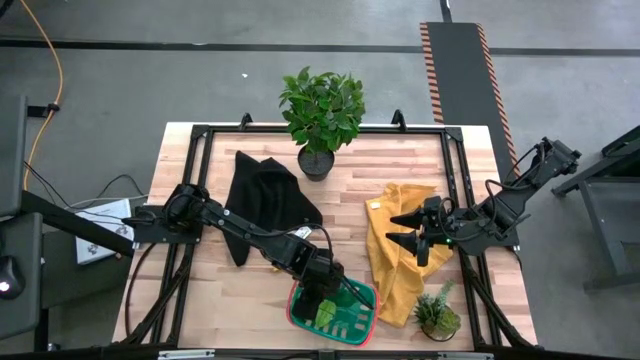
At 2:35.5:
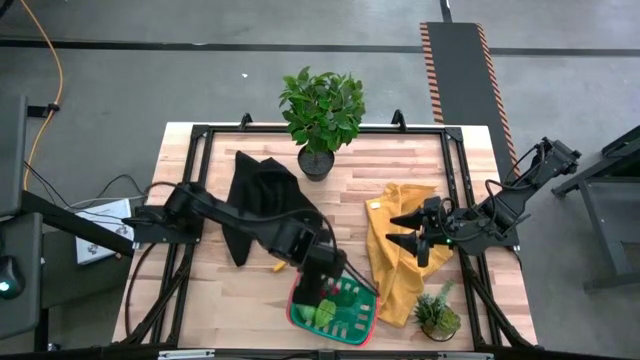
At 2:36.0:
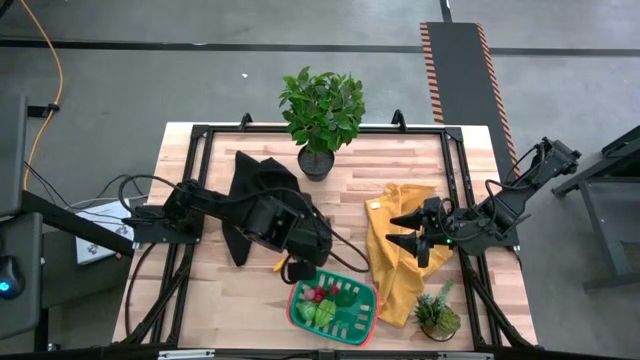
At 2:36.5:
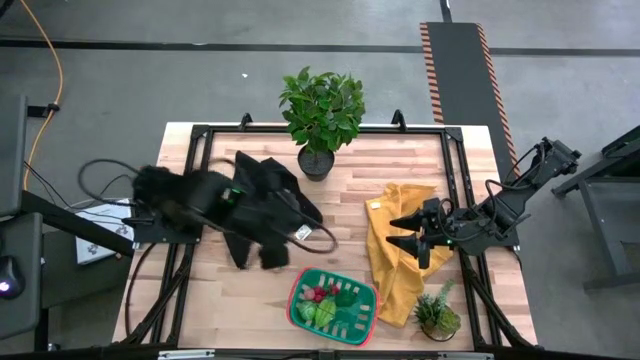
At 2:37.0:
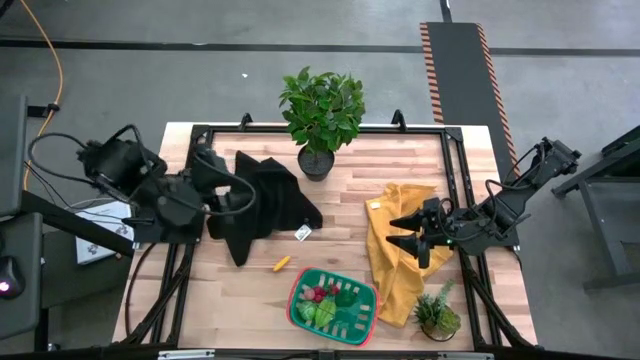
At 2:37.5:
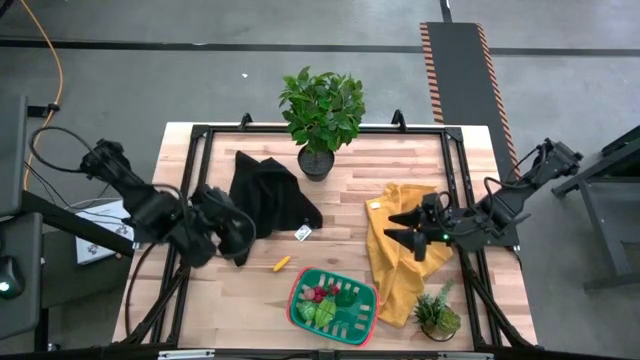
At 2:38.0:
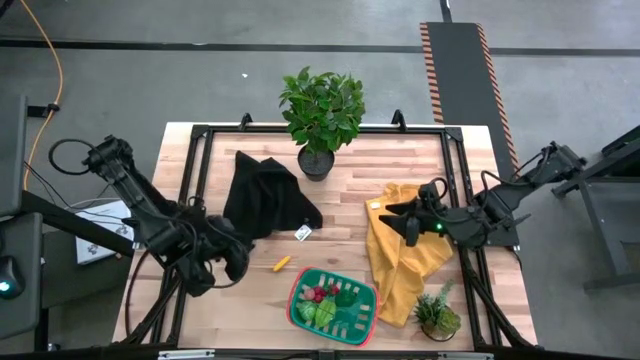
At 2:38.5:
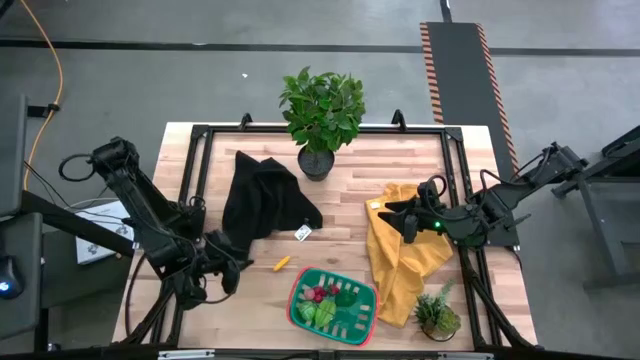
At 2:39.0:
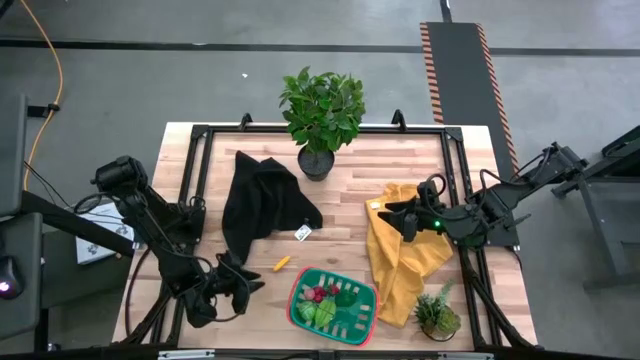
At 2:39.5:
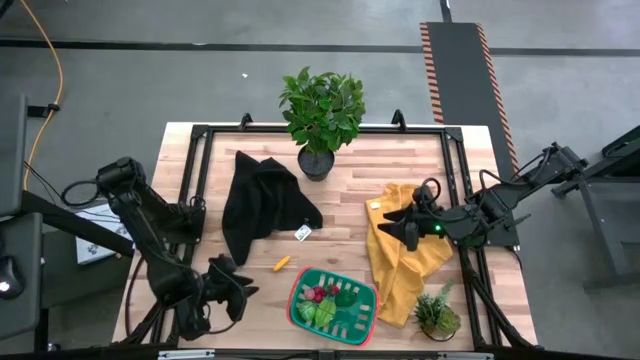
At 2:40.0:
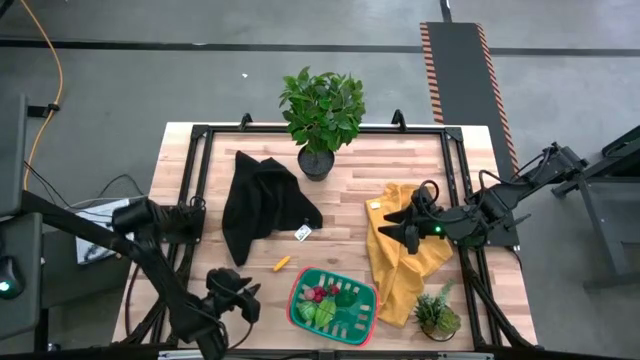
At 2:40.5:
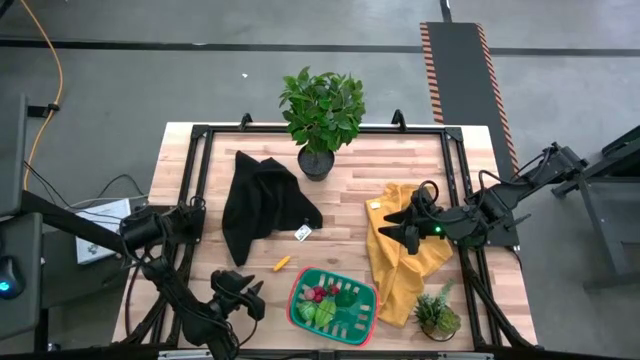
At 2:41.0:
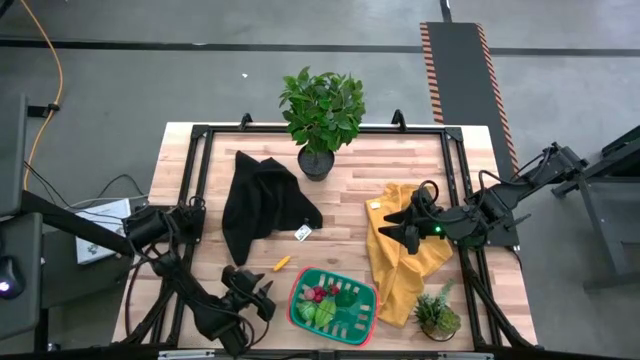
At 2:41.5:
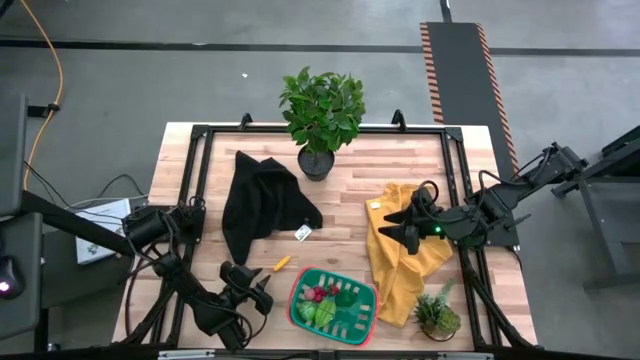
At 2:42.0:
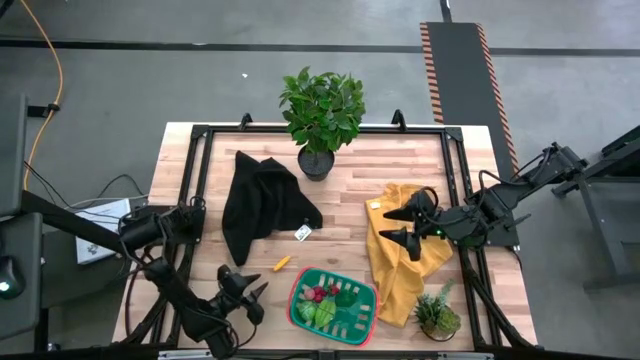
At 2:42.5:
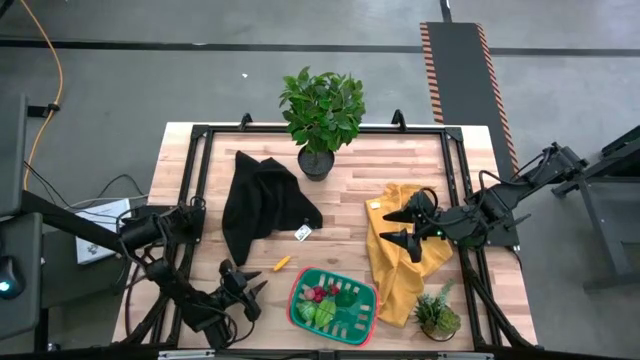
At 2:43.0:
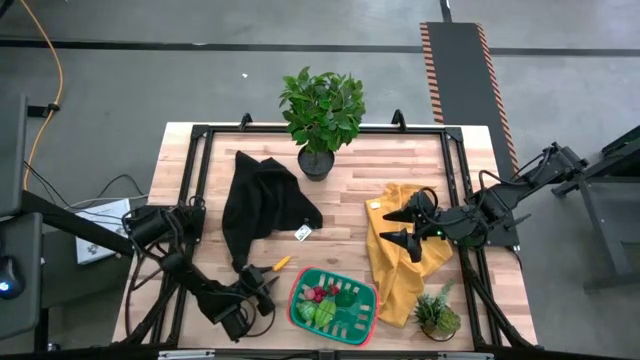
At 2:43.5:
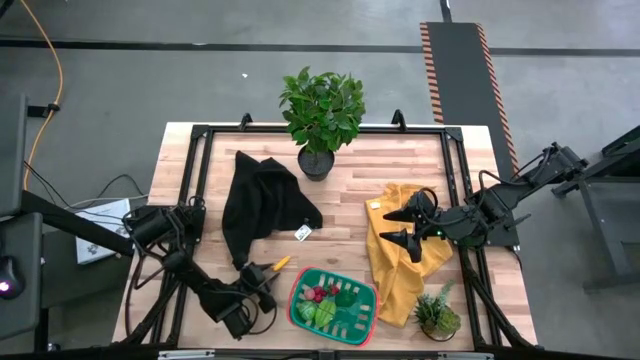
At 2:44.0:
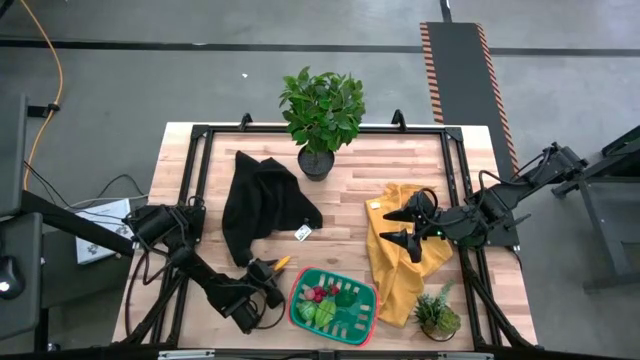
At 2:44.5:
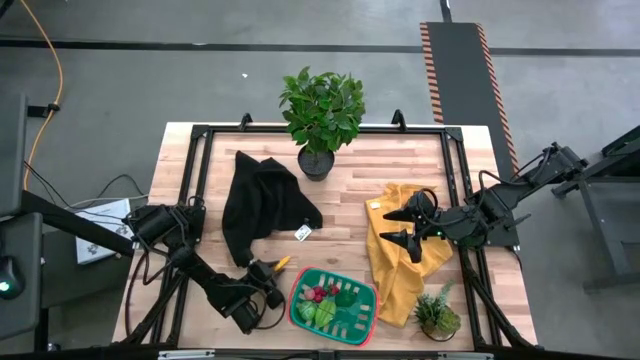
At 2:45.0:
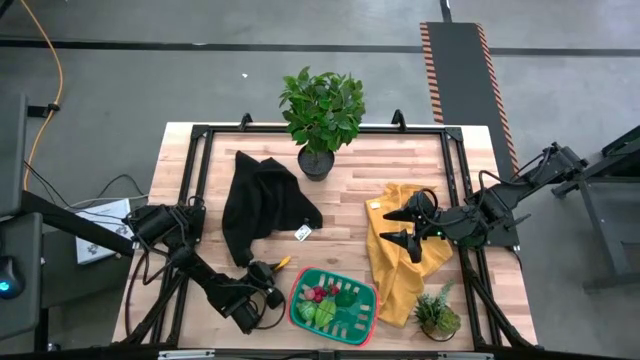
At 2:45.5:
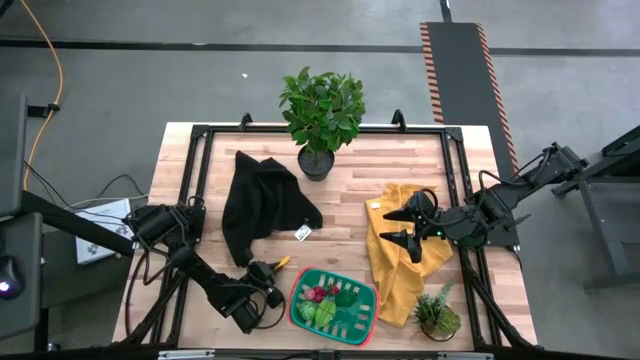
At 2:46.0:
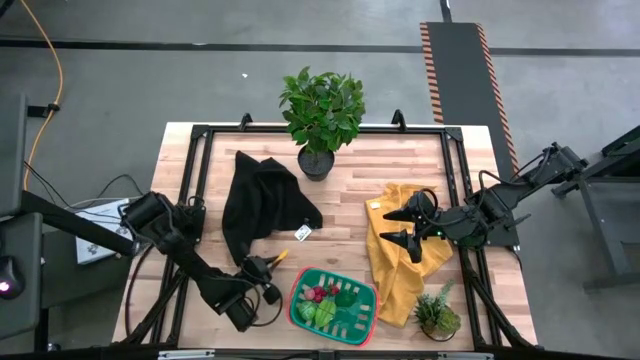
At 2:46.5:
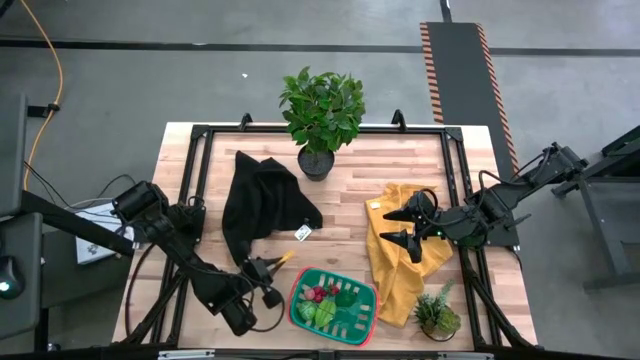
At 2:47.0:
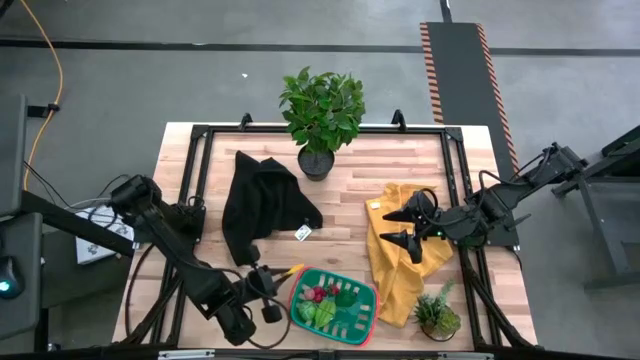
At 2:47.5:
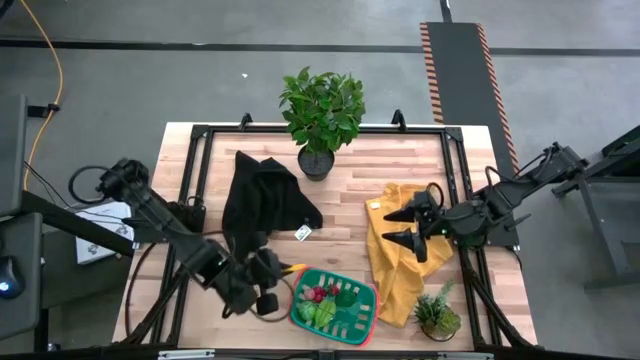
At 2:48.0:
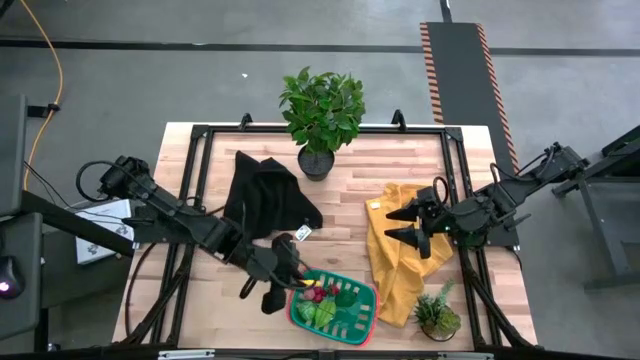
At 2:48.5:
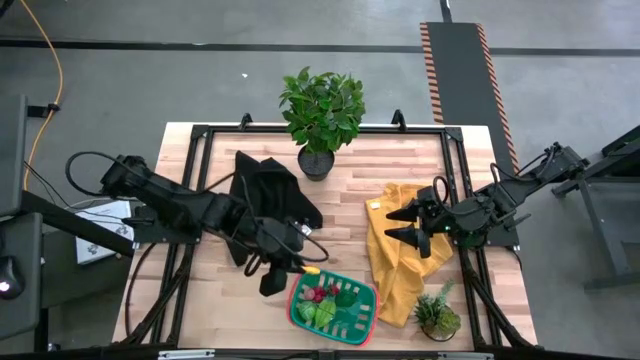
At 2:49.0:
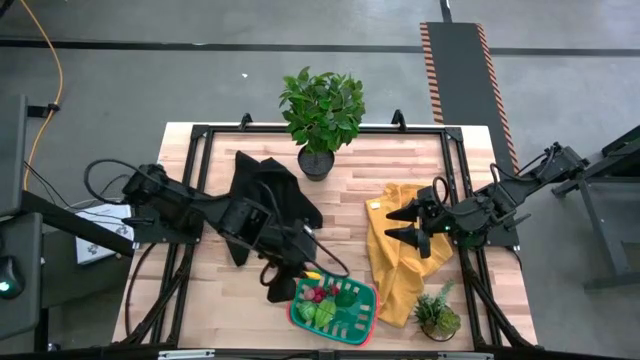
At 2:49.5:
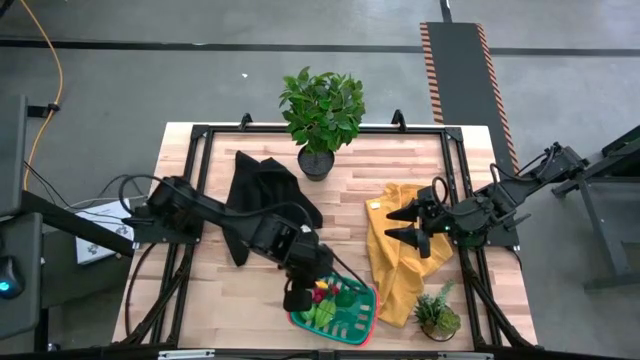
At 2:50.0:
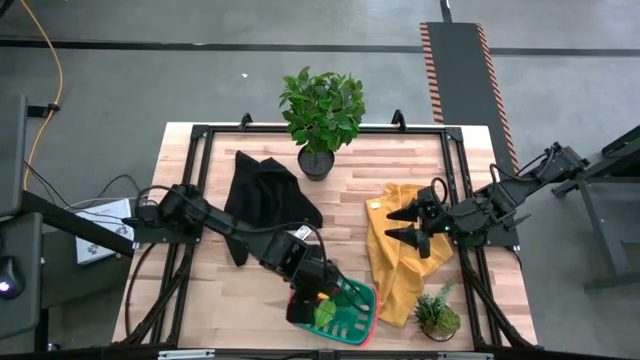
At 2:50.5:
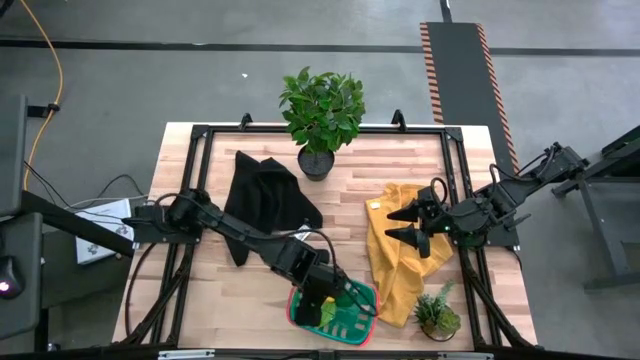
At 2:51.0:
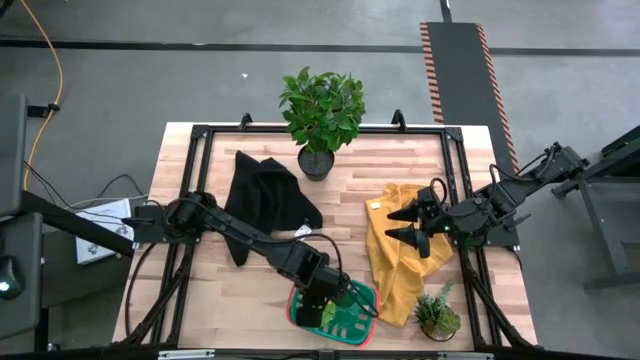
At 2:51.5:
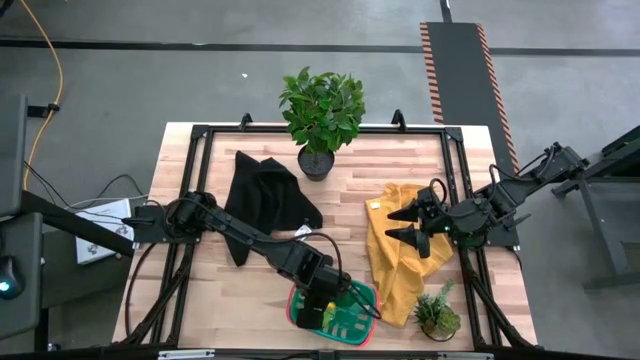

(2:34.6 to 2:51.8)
Task: Pick and placing Produce into tupperware
Put the yellow corn into the blue bin

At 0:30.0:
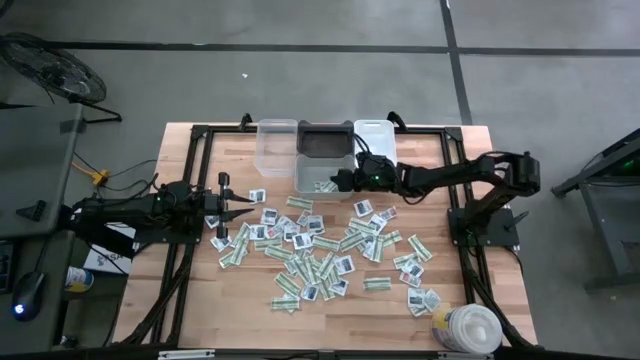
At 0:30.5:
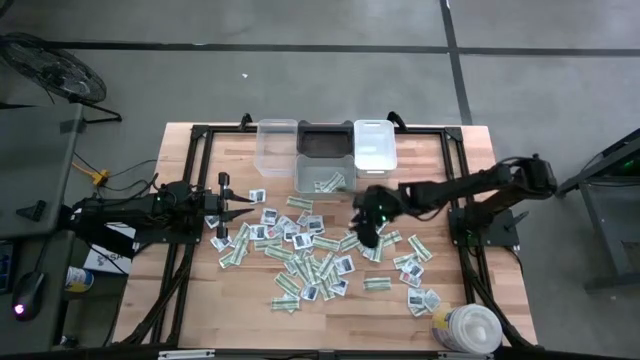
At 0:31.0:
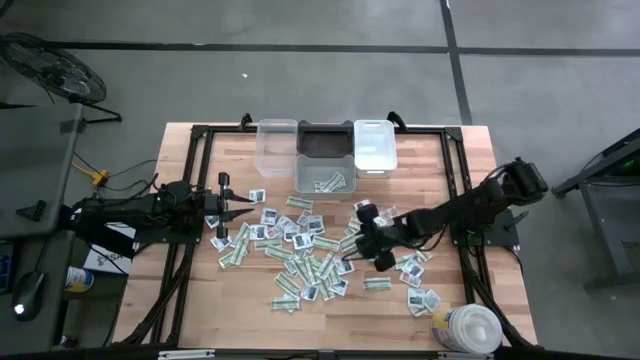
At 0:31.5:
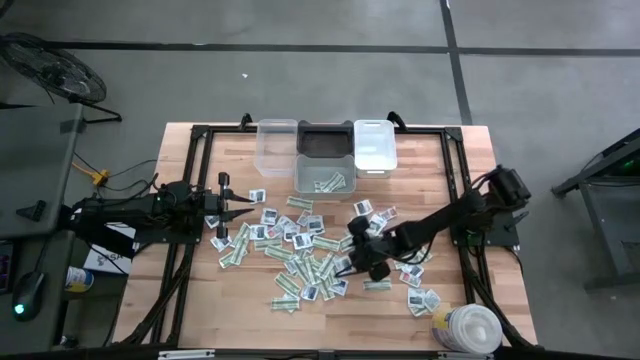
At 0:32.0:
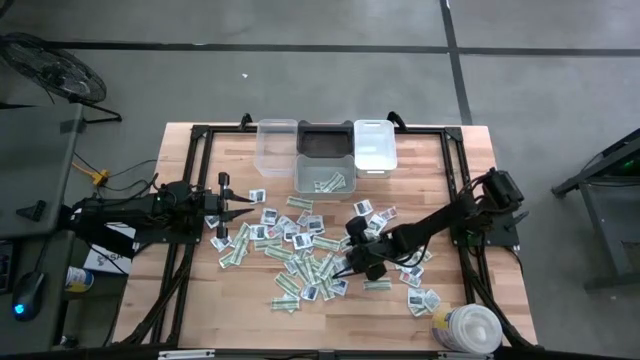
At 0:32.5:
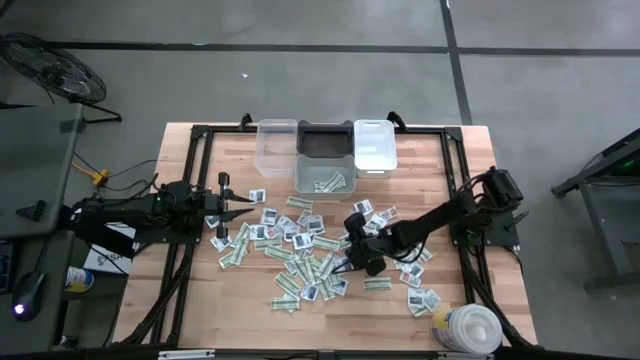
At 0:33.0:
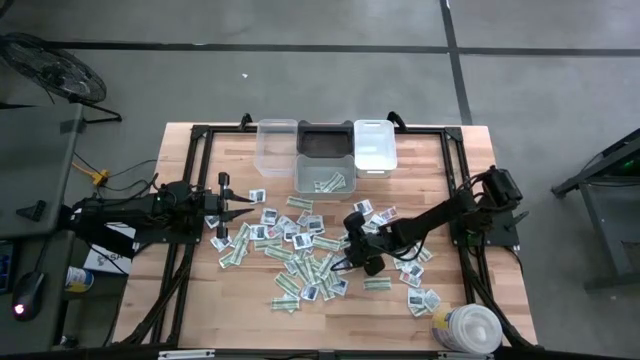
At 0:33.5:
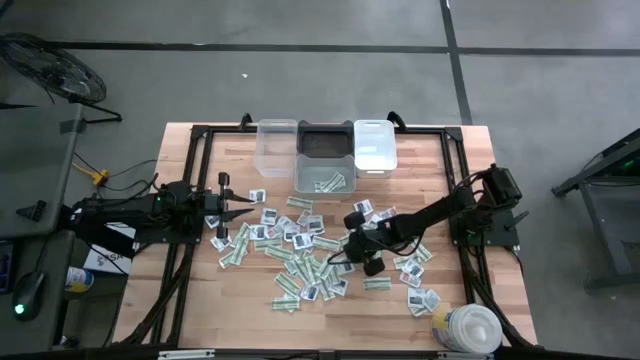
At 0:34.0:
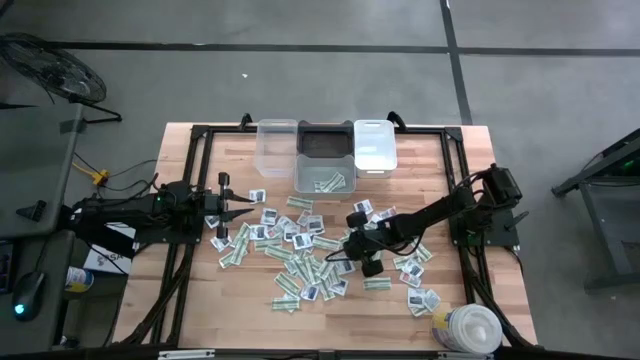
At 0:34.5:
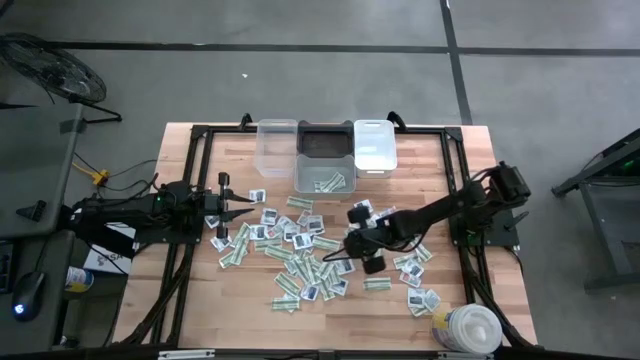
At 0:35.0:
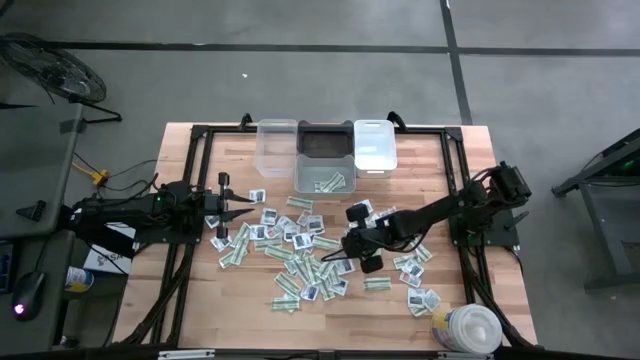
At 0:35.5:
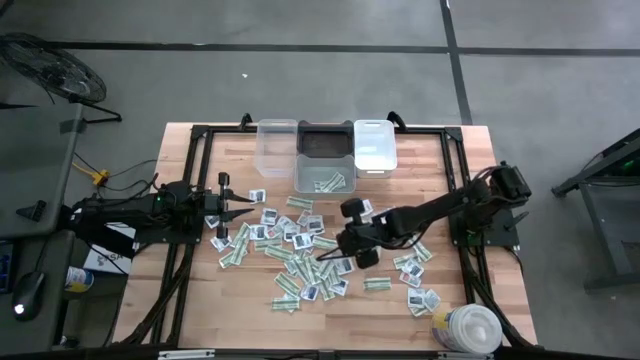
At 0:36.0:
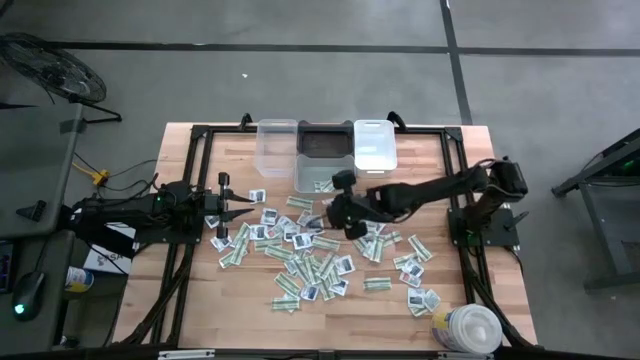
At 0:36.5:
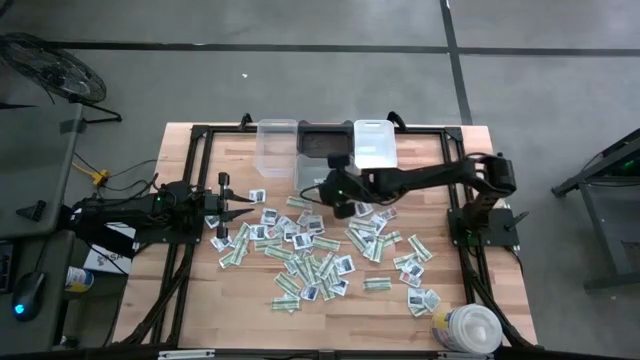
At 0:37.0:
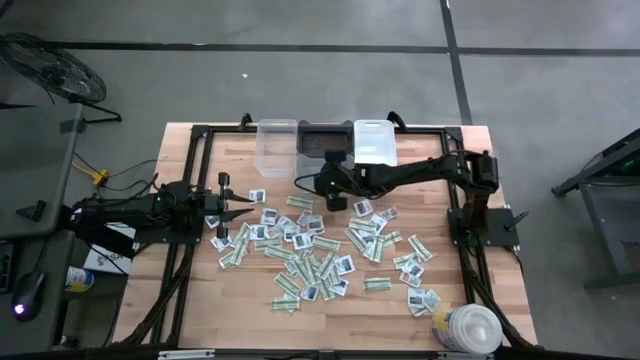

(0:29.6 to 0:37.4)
Task: Pick & Place First Aid Supplies
Put the bandage pack into the gray bin
